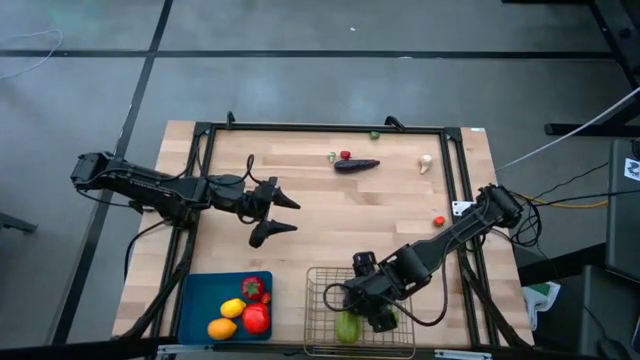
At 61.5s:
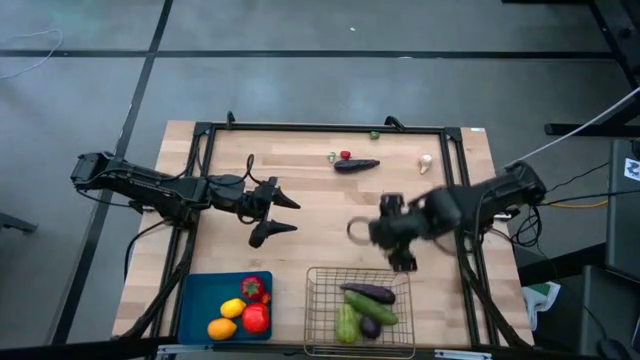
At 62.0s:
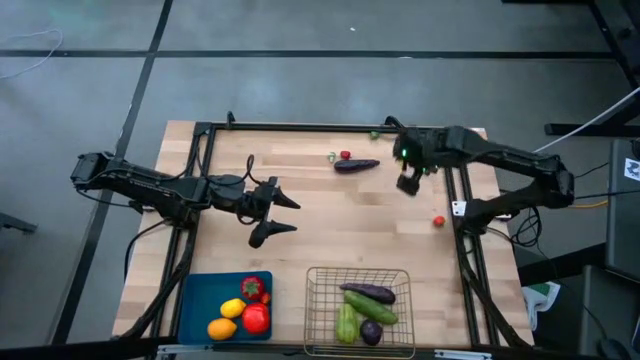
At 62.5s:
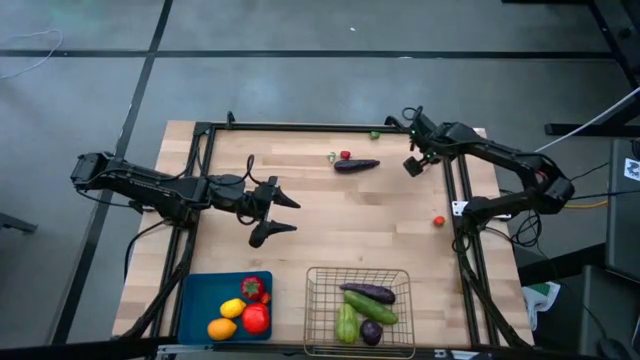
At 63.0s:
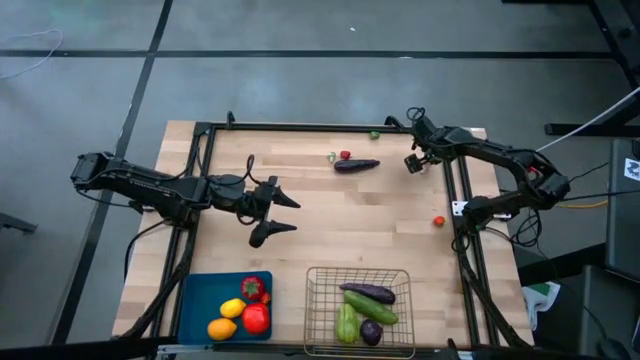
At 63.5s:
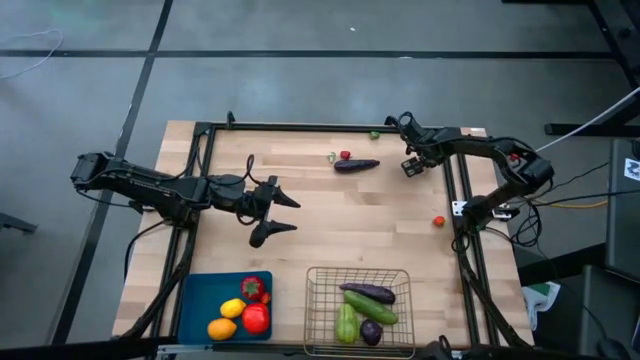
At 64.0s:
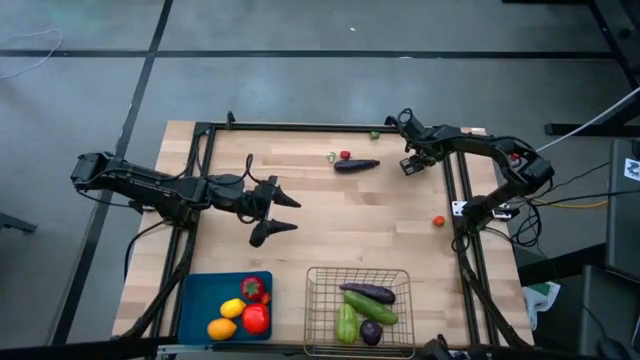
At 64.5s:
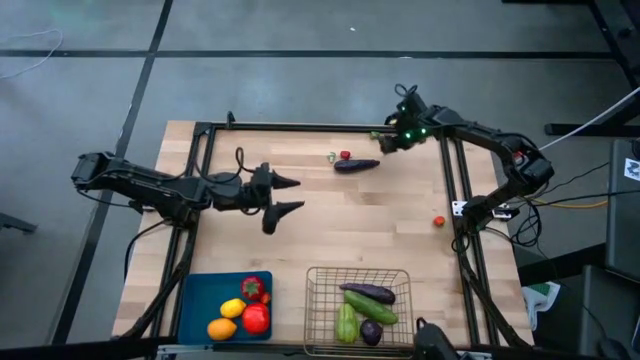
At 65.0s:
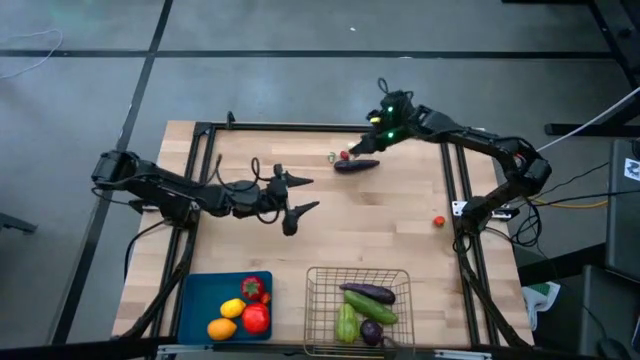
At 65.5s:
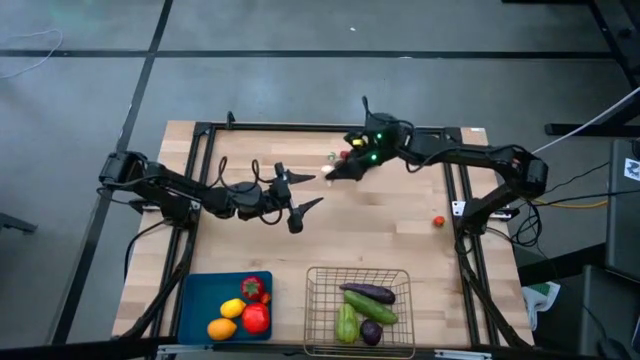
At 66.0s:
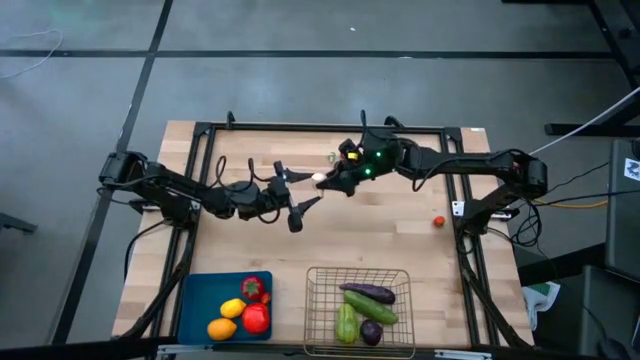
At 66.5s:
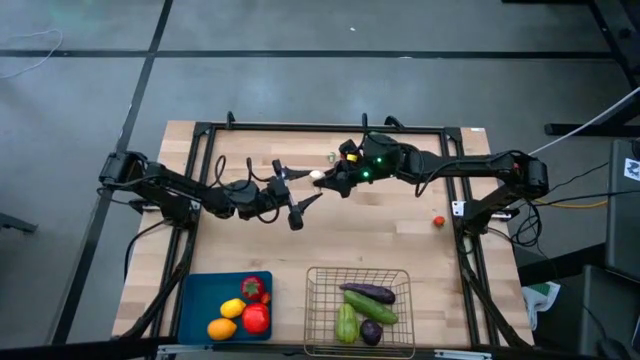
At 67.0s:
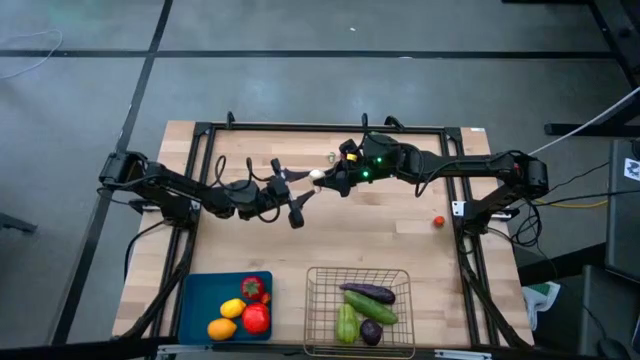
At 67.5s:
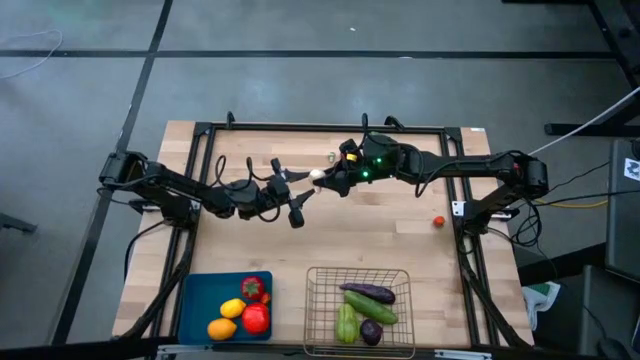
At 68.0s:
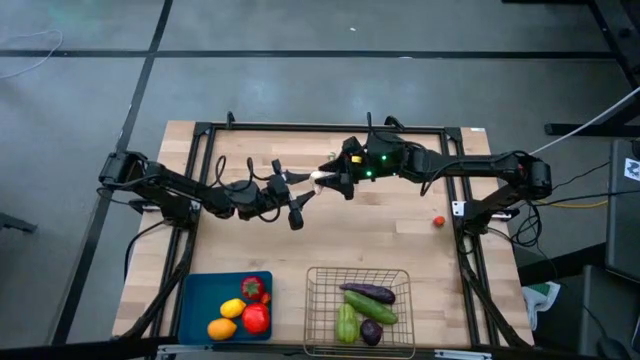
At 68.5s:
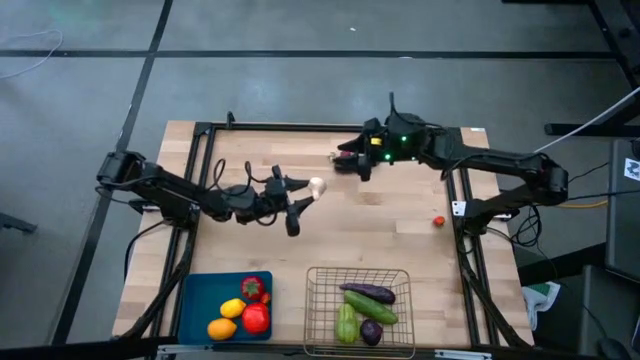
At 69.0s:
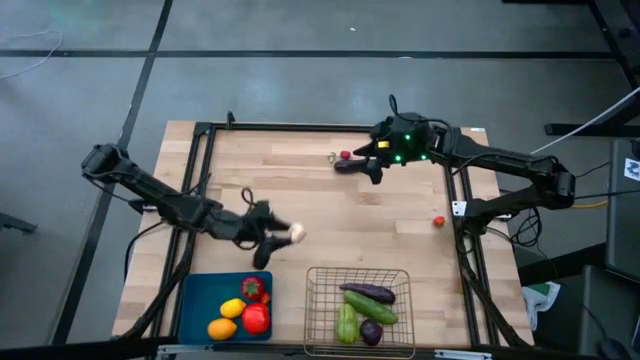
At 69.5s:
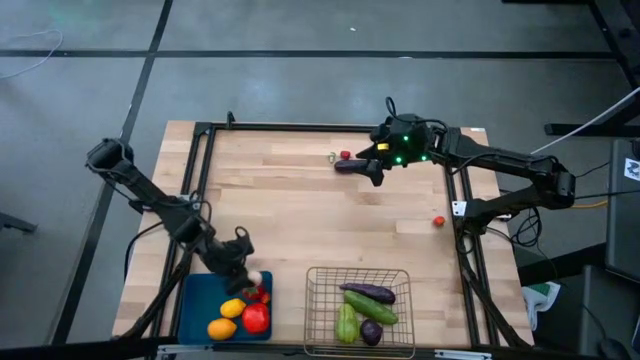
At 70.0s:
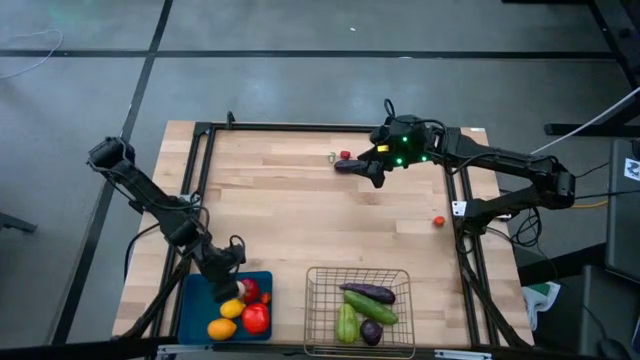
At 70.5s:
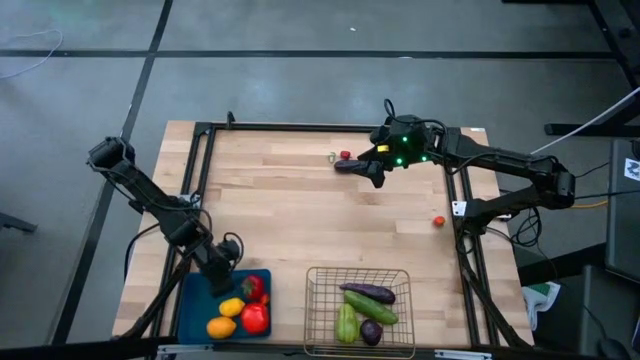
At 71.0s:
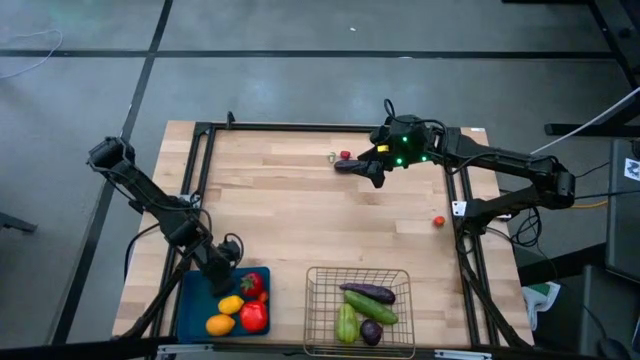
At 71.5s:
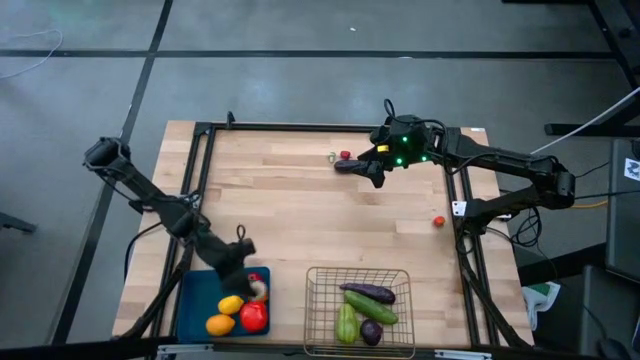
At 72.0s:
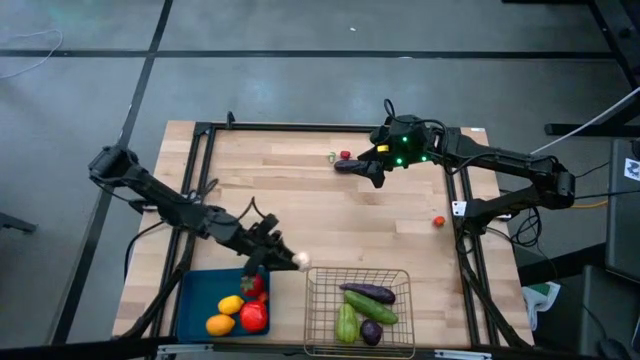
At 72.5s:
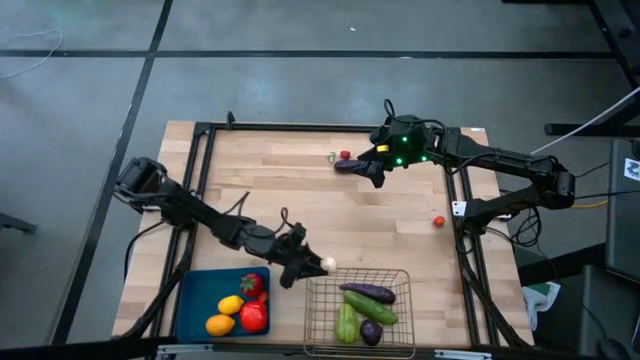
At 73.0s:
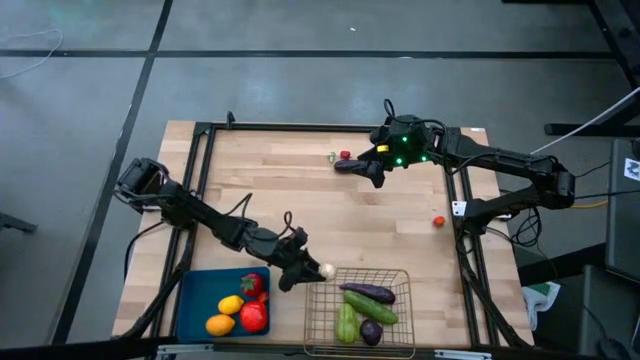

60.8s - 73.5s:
Task: Sort produce into baskets
Put the garlic into the gold wire basket

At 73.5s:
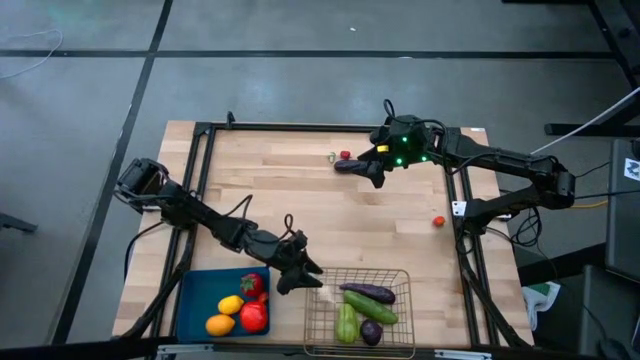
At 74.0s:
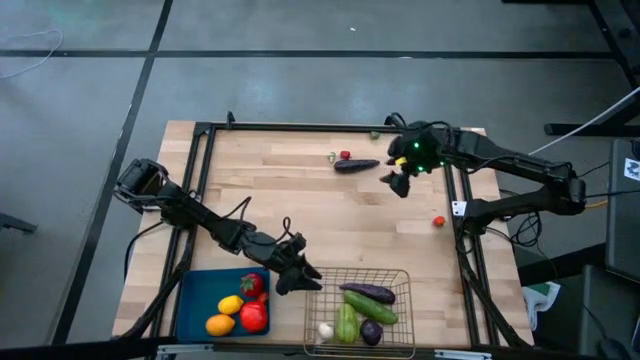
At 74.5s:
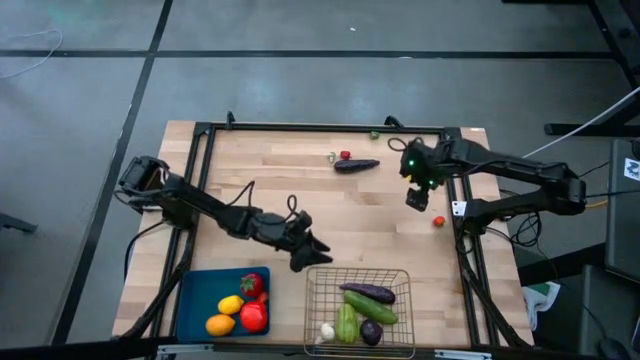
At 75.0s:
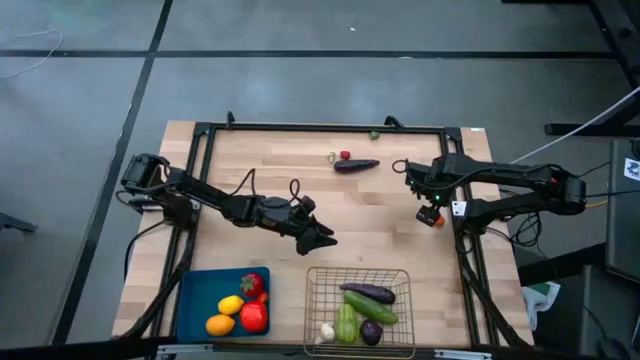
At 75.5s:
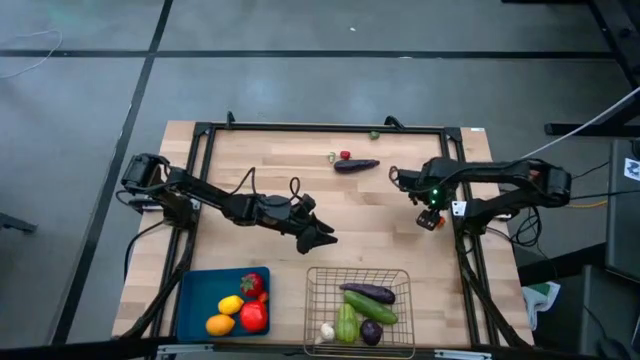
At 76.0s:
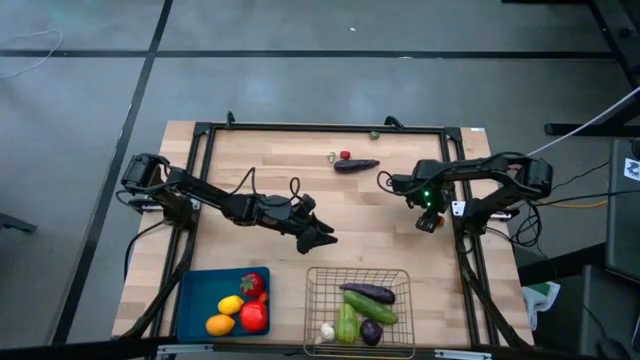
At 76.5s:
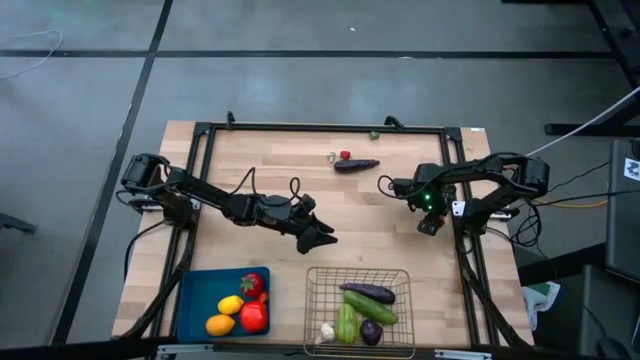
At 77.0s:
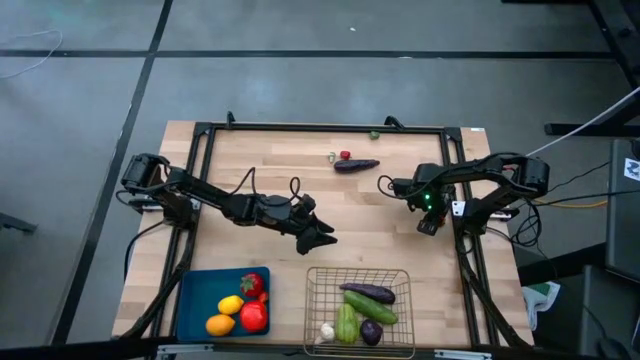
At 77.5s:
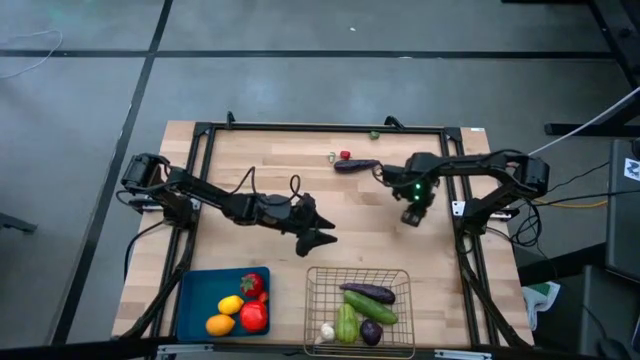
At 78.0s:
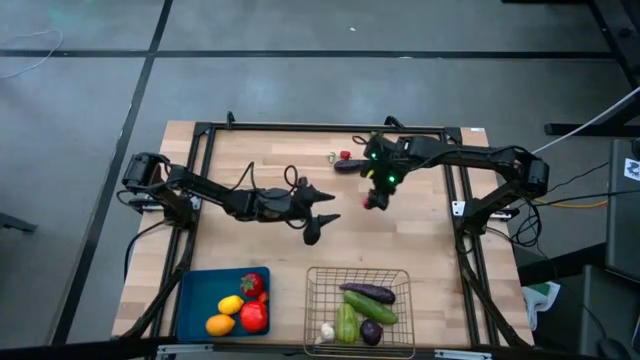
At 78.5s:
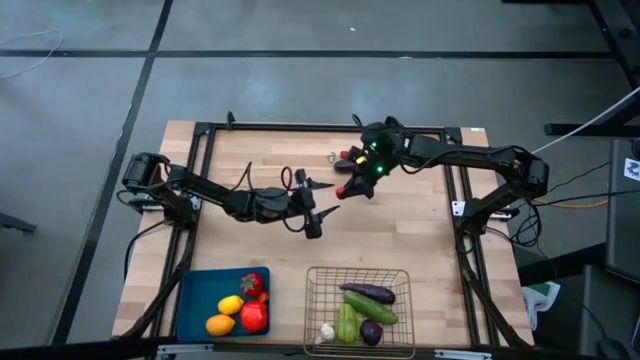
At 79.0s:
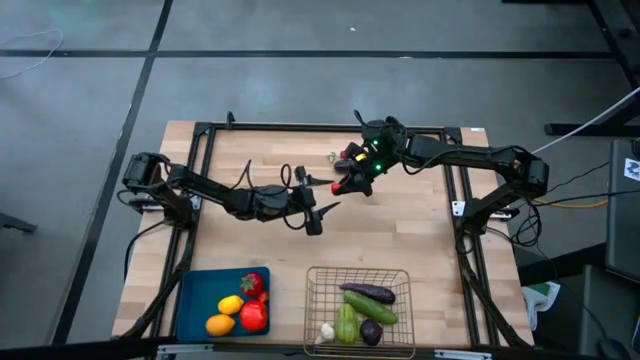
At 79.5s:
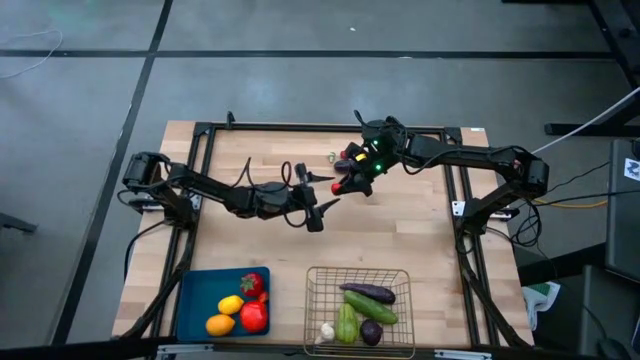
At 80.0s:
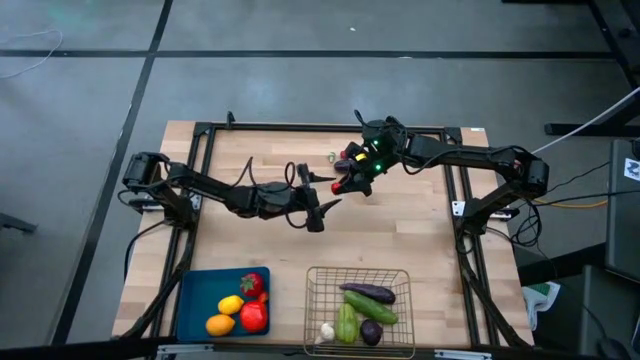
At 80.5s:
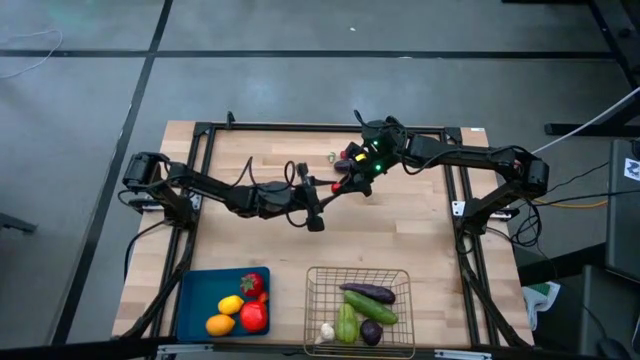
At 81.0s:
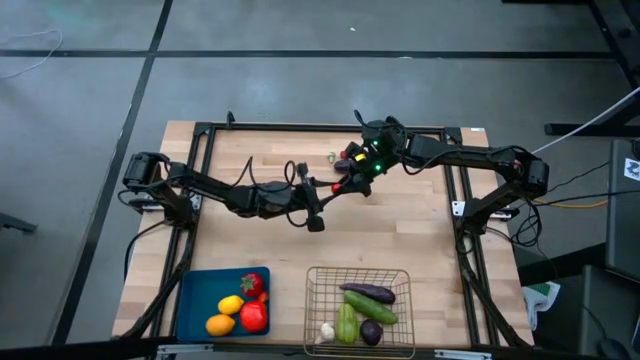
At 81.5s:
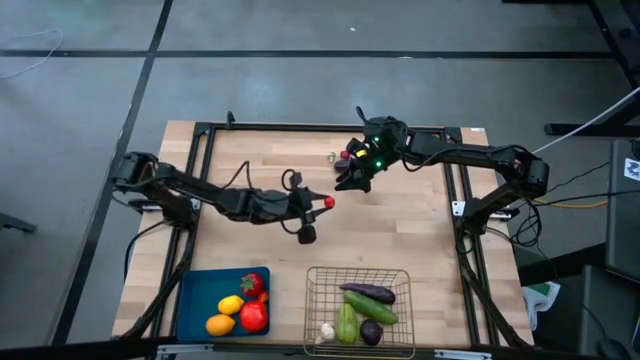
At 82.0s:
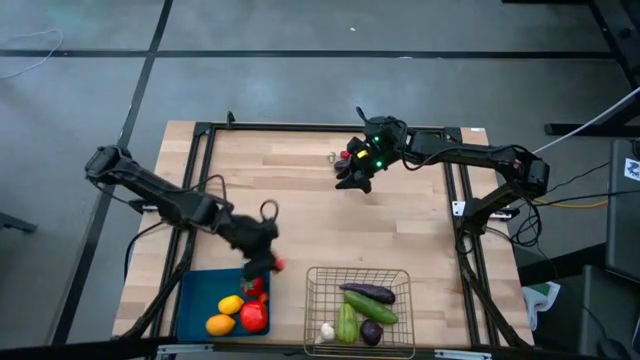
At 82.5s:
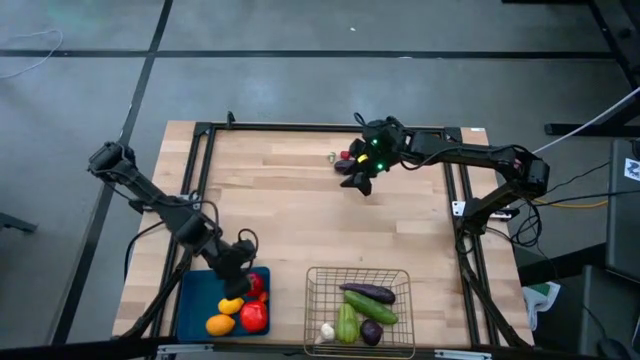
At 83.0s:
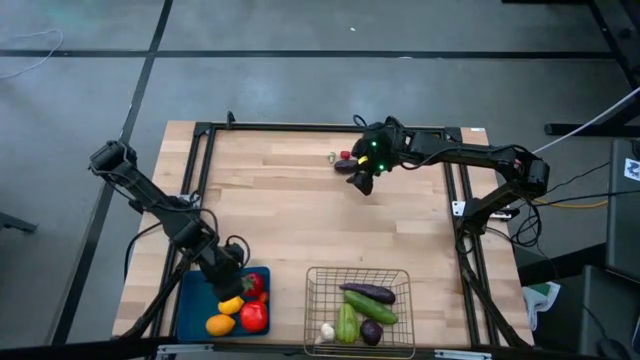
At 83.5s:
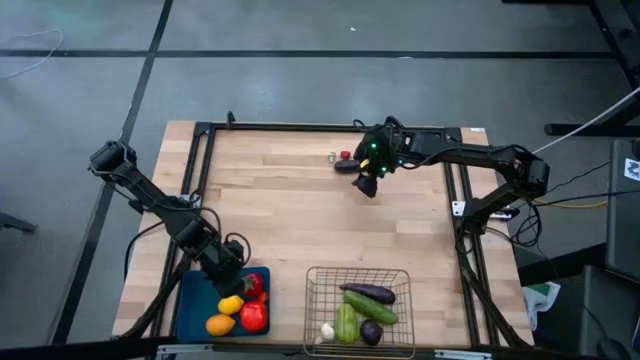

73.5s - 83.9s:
Put the small tomato into the blue bin
